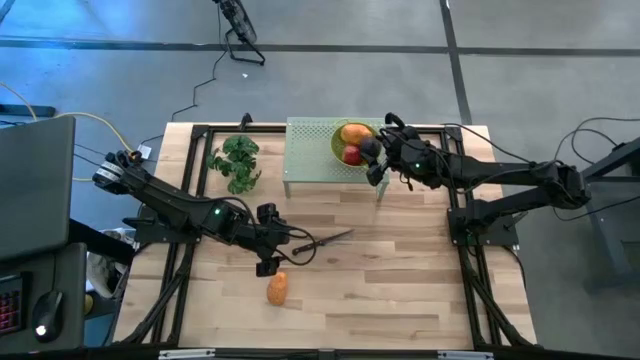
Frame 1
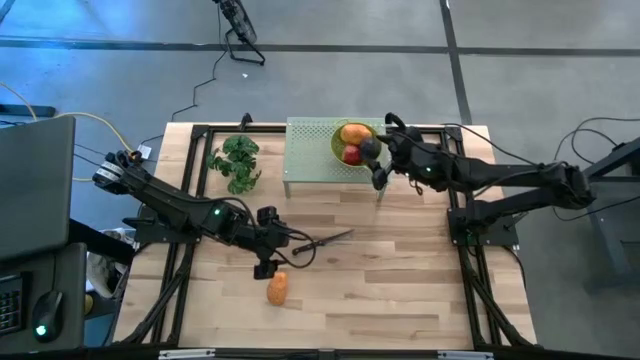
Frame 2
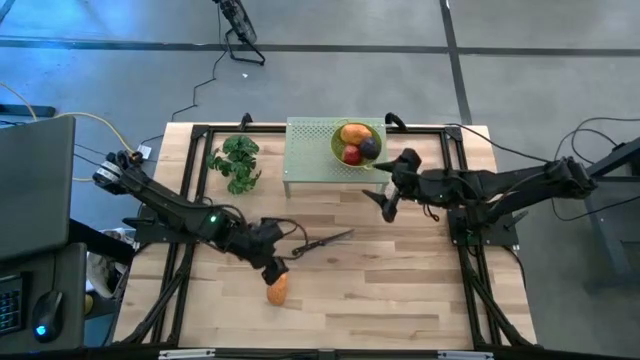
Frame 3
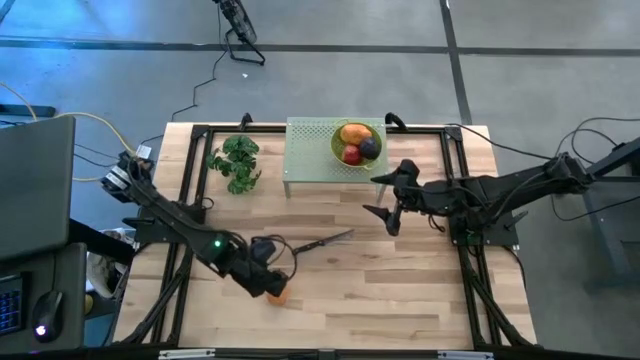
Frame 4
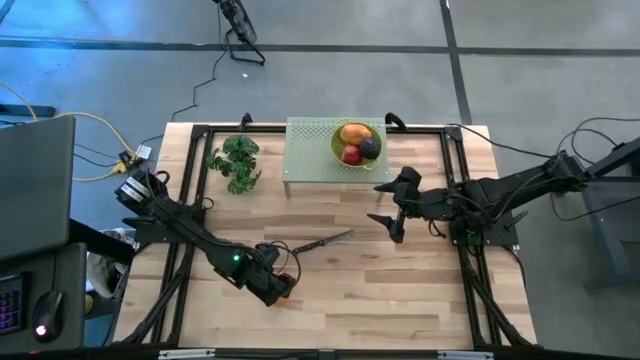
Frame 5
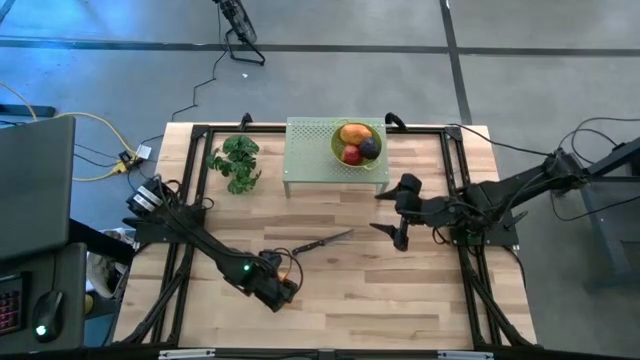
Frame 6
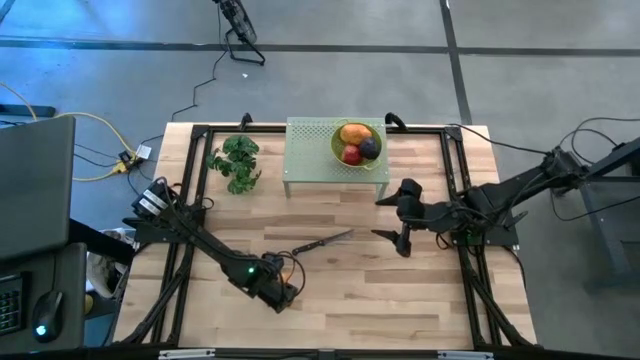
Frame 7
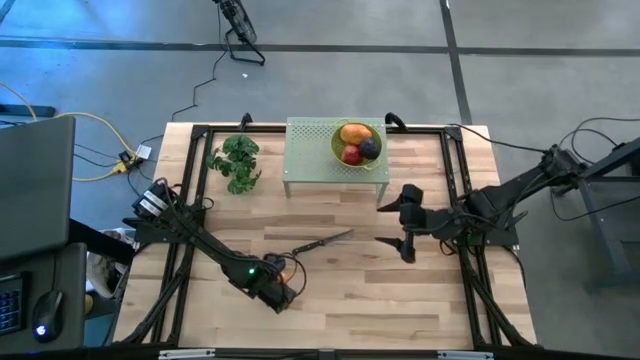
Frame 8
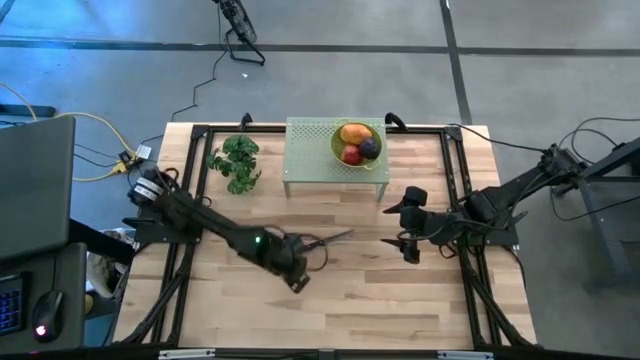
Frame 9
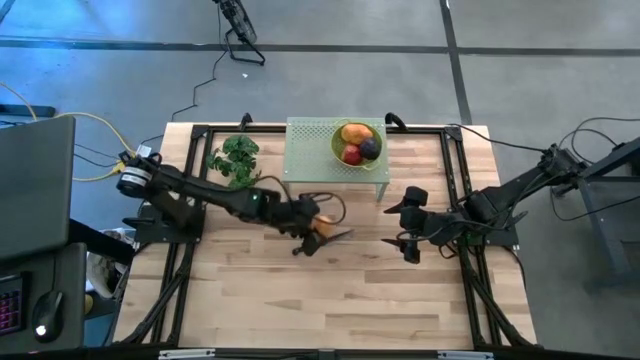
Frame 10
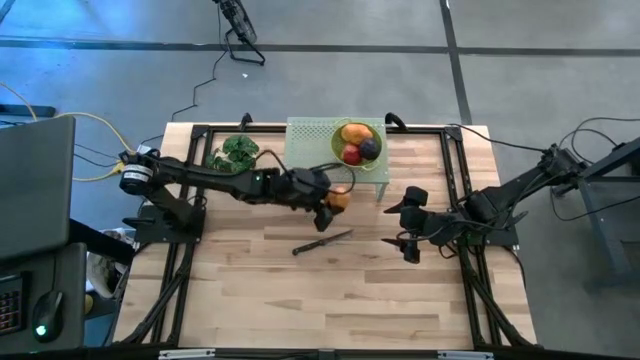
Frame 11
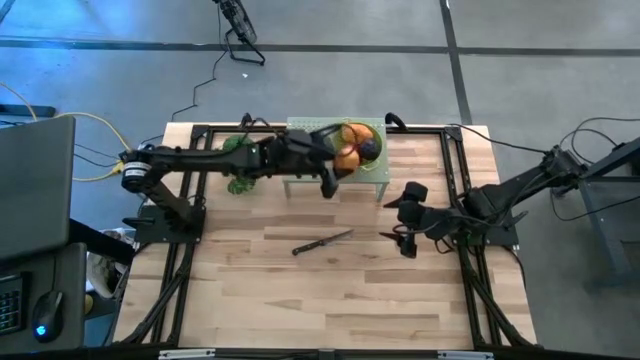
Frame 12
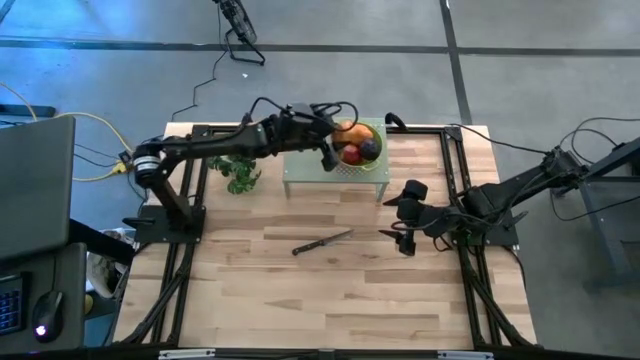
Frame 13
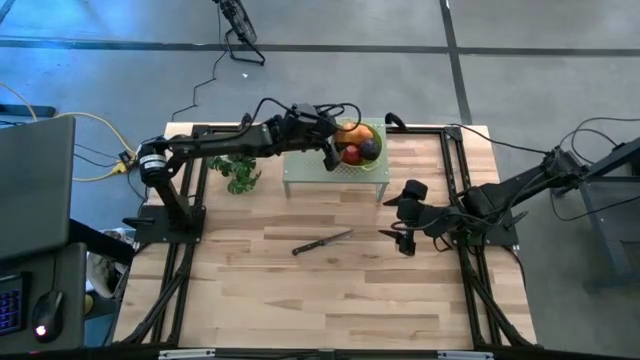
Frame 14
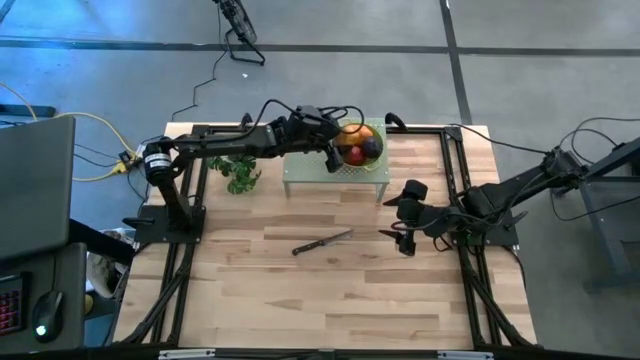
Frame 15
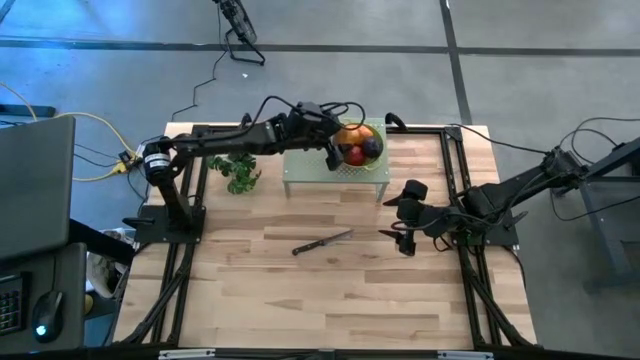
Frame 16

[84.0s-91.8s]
Task: Pick & Place Fruit
Put the yellow mango into the green strainer bowl on the shelf

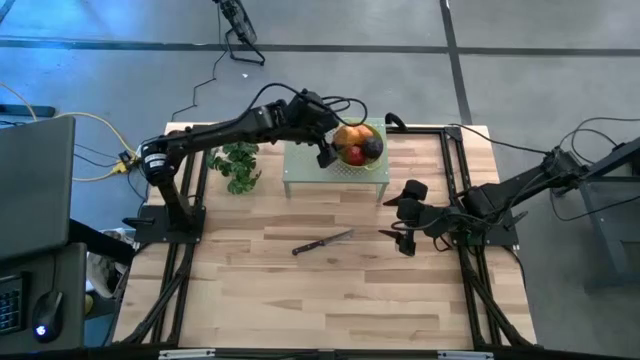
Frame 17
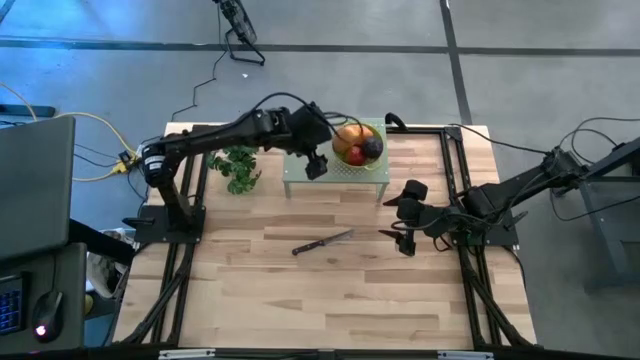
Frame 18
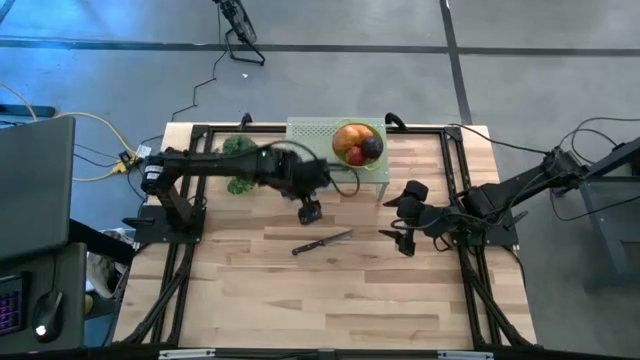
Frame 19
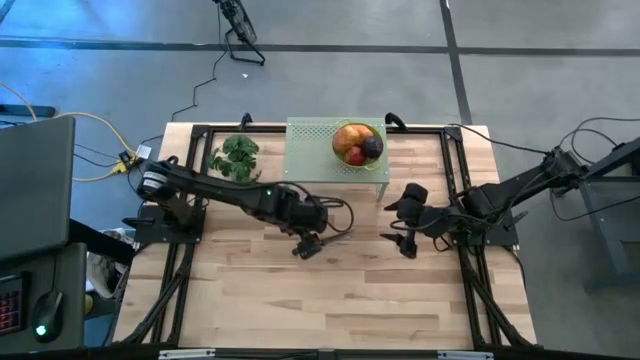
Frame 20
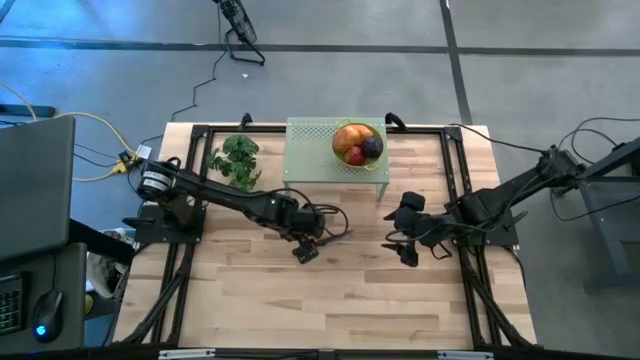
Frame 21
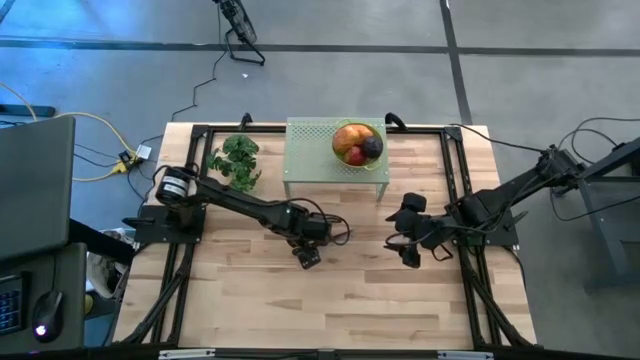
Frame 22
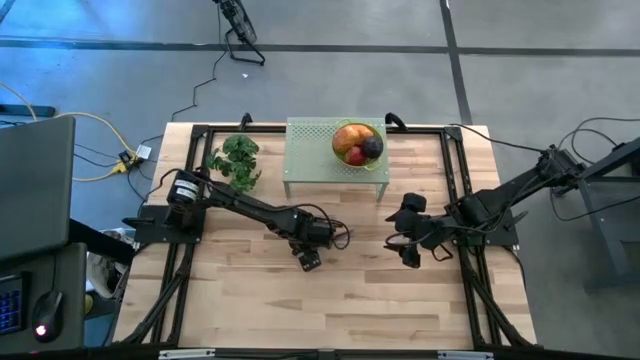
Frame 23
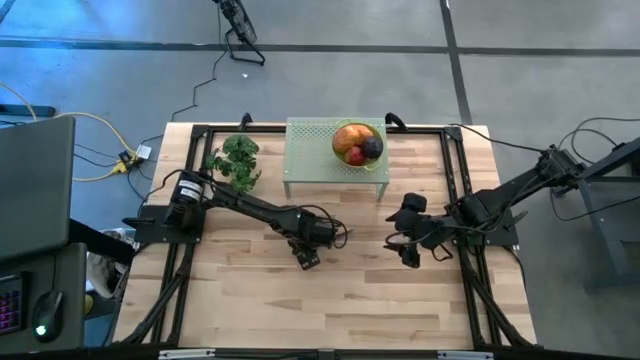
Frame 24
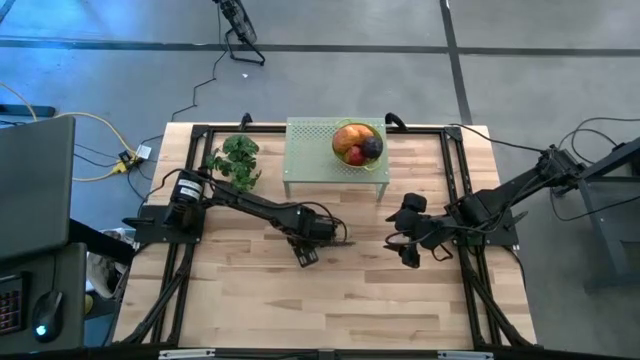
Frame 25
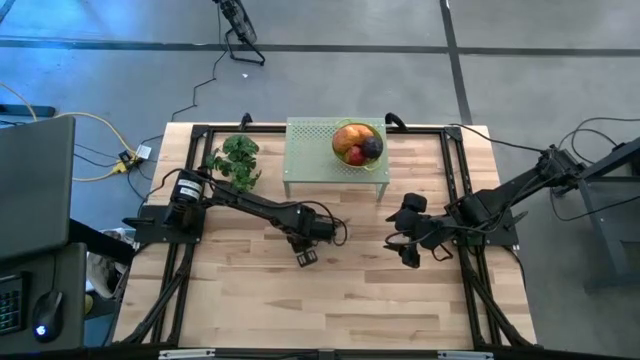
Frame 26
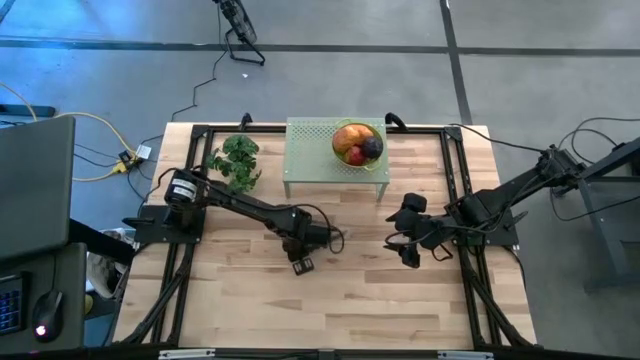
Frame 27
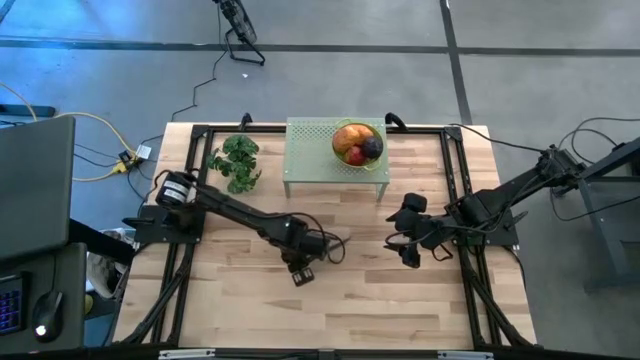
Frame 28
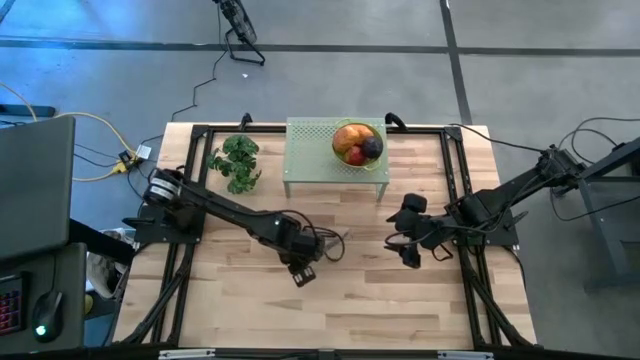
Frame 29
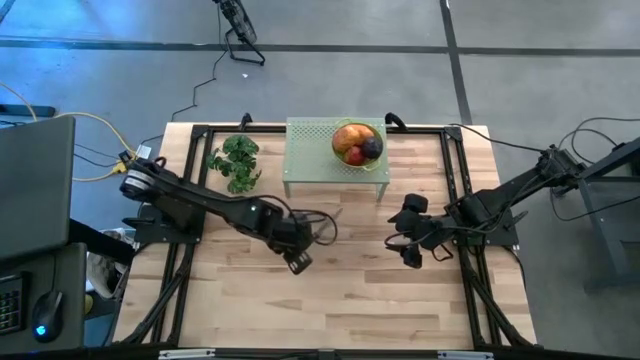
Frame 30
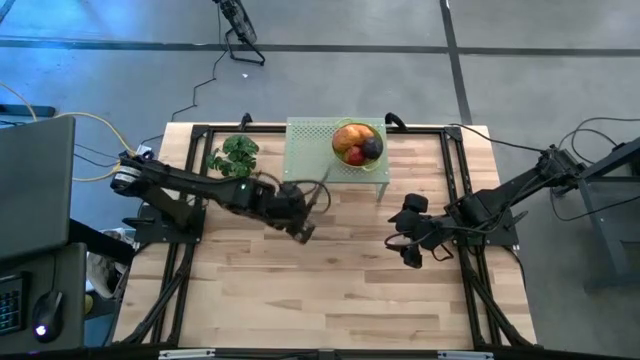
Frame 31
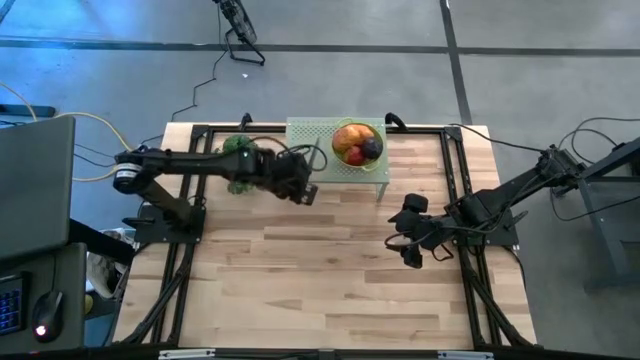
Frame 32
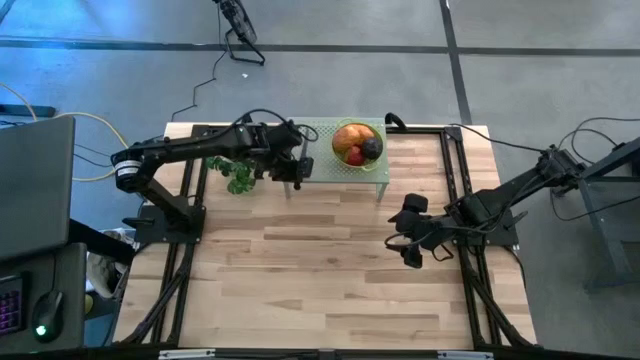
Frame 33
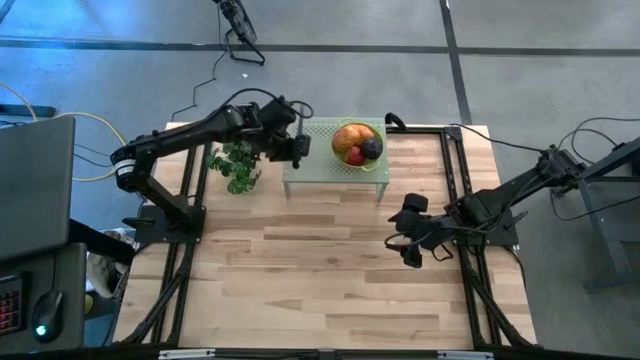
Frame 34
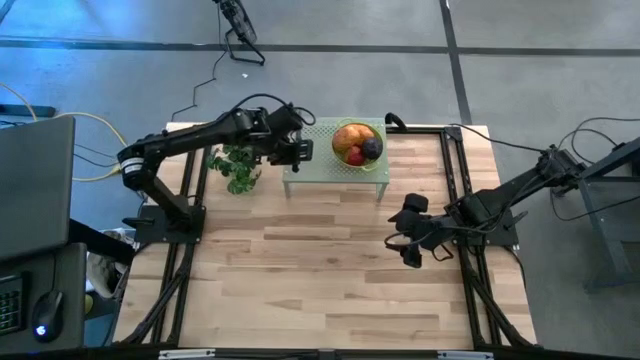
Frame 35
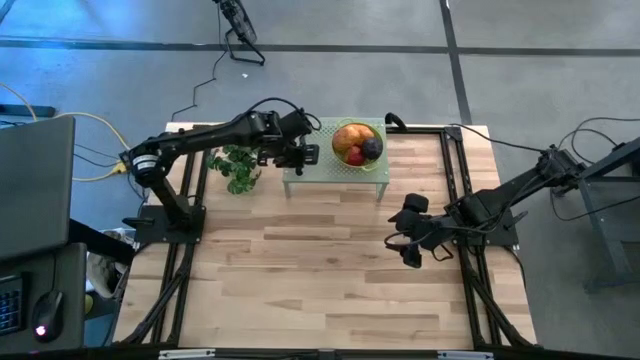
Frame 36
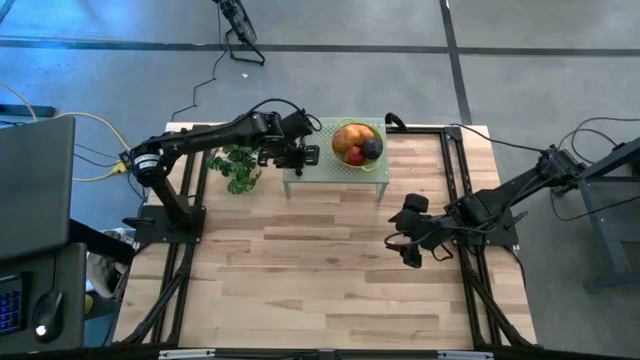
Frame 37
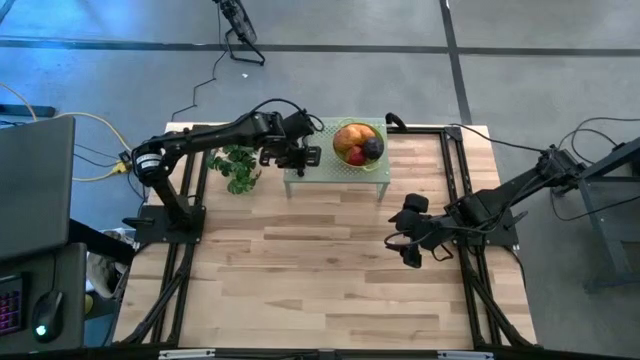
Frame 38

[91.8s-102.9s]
Put the black knife on the shelf

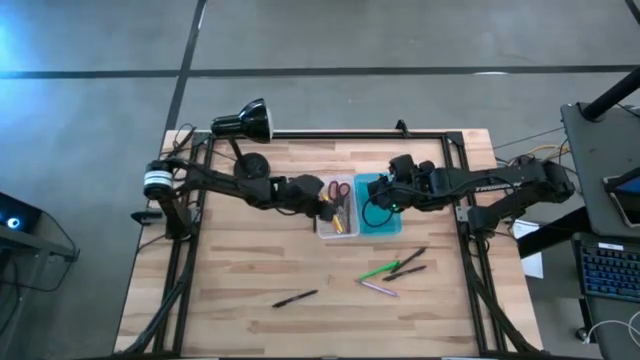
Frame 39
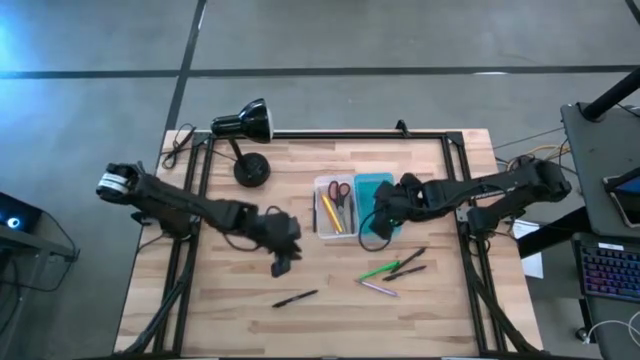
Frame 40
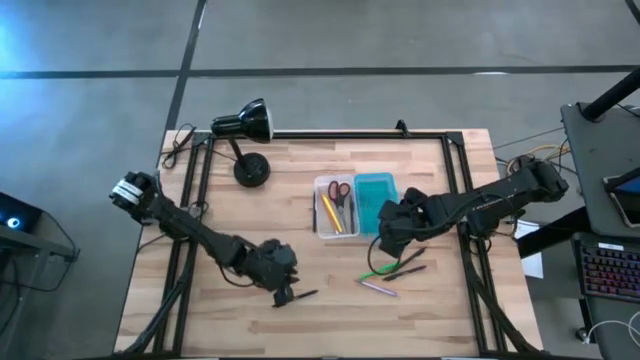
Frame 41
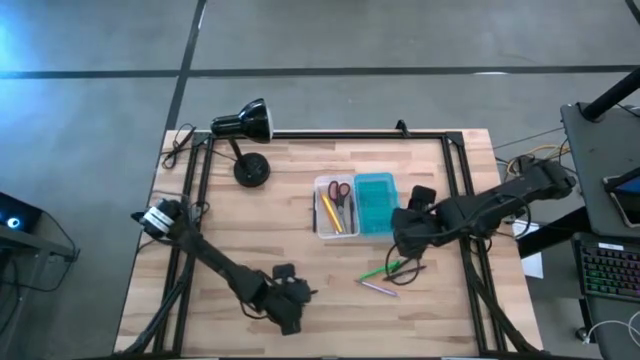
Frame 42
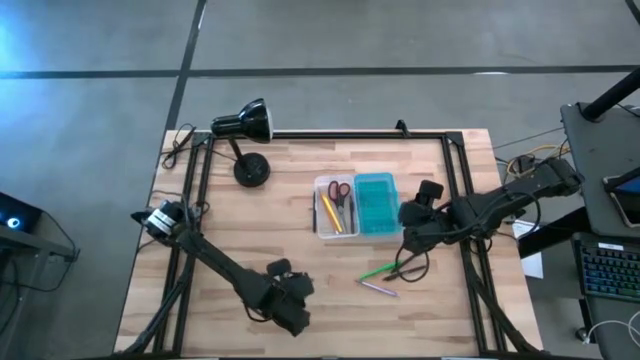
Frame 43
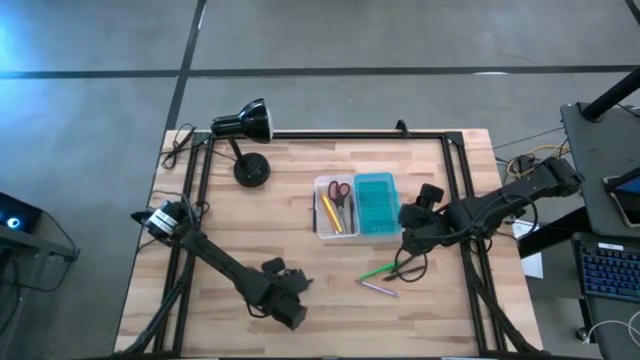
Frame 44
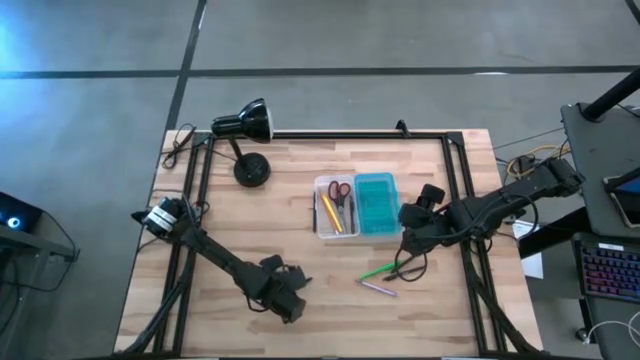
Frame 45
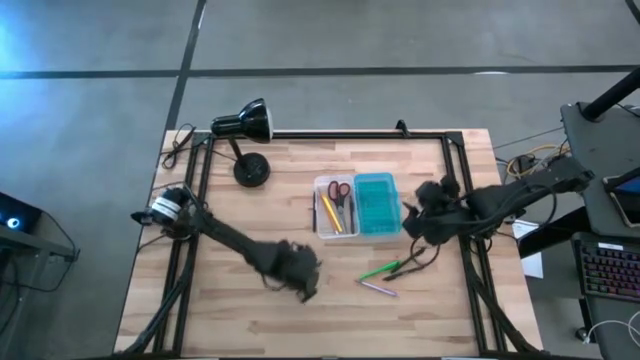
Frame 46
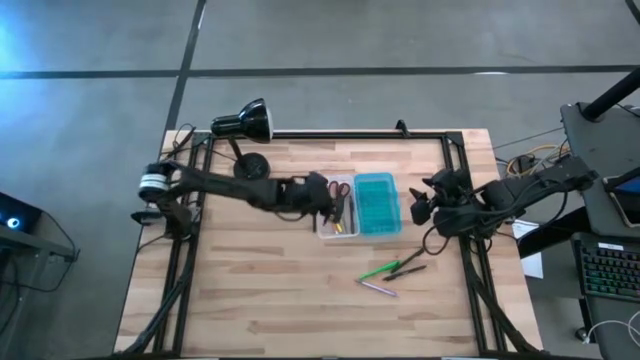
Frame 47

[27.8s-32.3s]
Task: Pick & place school supplies into a supply box
Put the black pen into the blue supply box

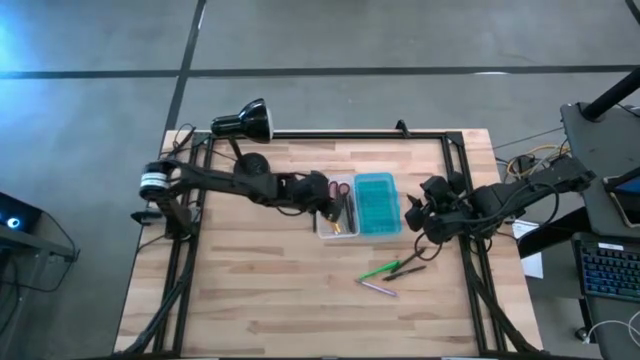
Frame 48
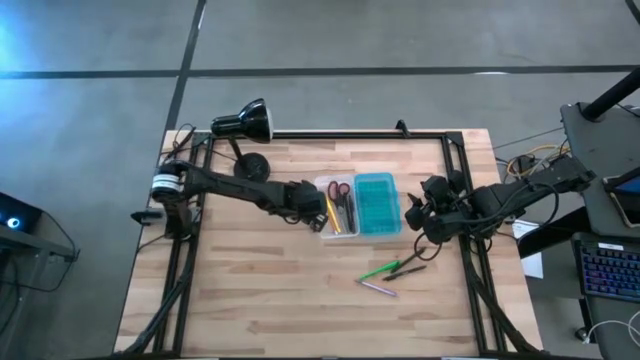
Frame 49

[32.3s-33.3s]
Adjust the blue supply box
